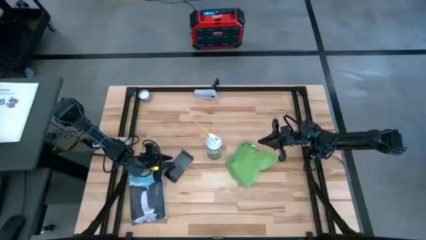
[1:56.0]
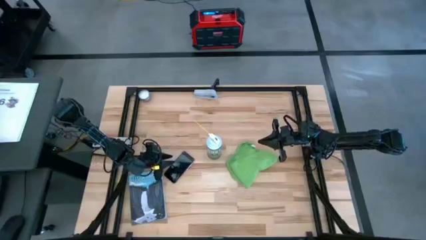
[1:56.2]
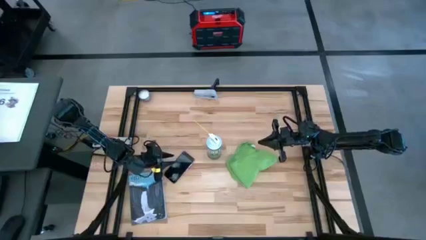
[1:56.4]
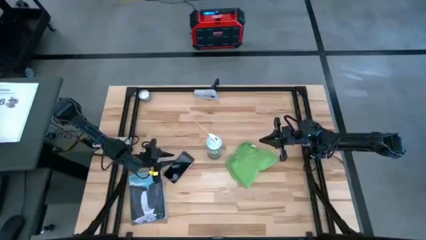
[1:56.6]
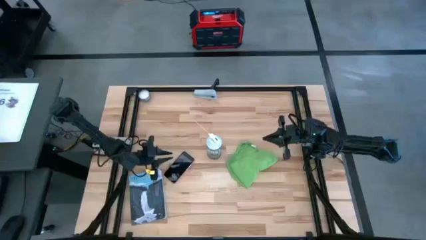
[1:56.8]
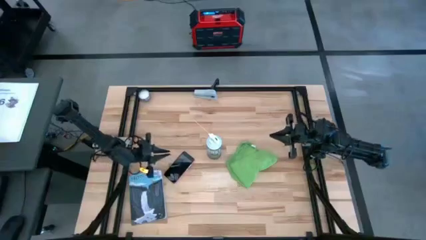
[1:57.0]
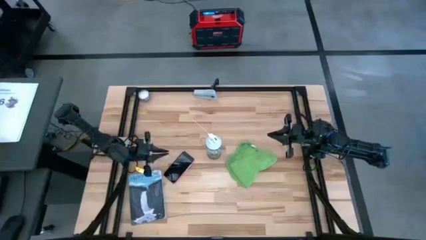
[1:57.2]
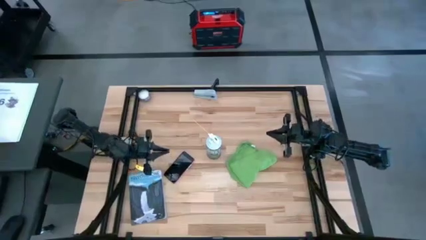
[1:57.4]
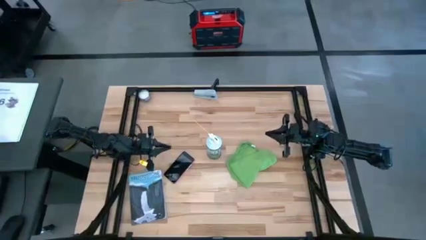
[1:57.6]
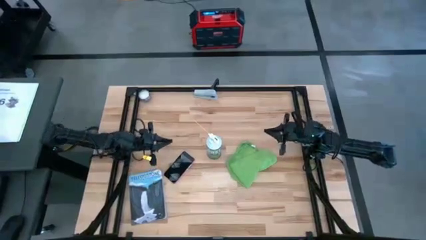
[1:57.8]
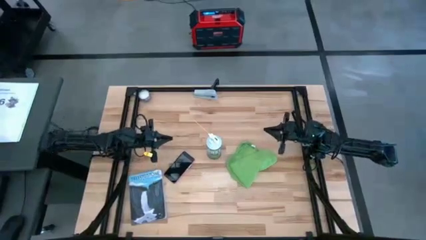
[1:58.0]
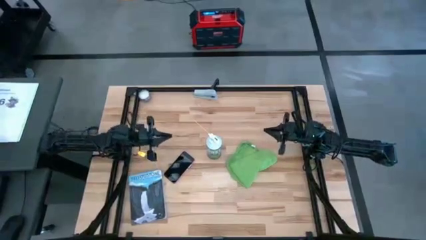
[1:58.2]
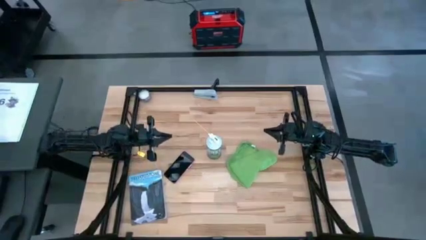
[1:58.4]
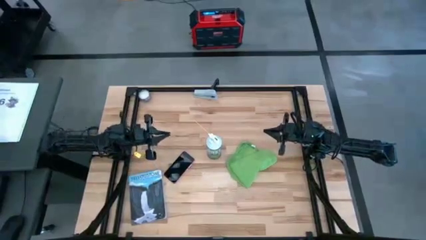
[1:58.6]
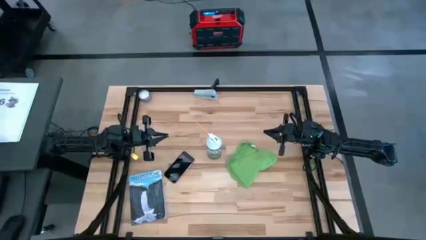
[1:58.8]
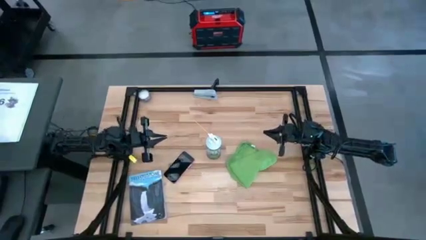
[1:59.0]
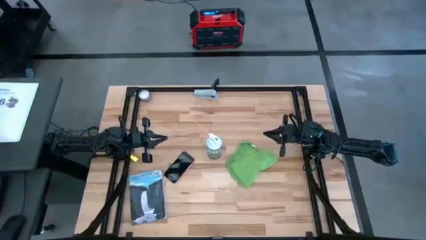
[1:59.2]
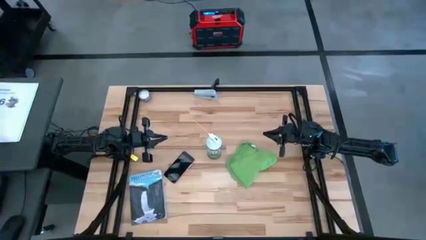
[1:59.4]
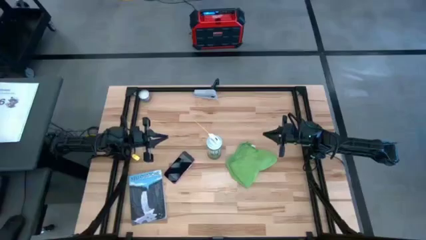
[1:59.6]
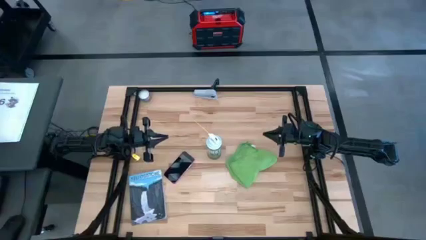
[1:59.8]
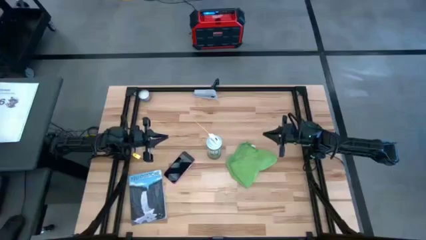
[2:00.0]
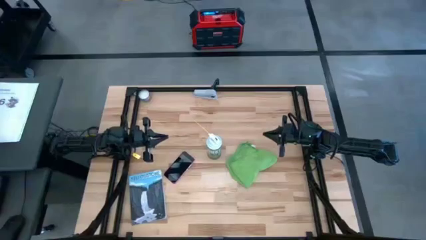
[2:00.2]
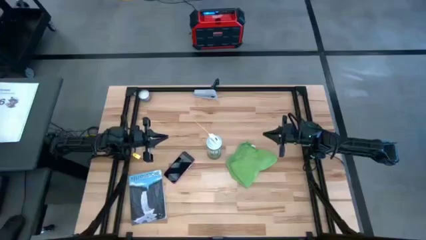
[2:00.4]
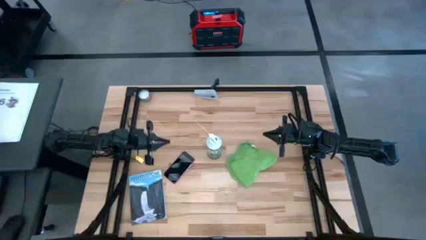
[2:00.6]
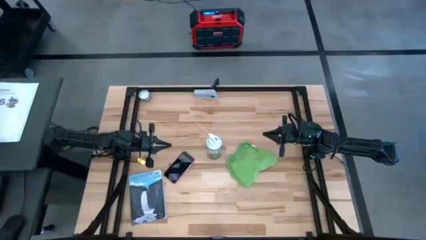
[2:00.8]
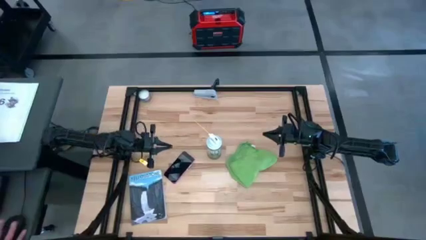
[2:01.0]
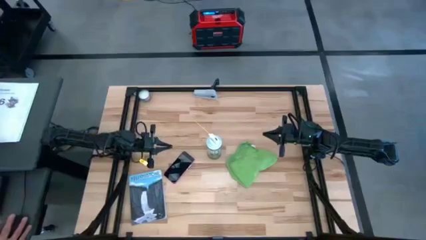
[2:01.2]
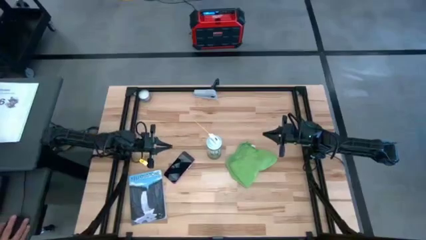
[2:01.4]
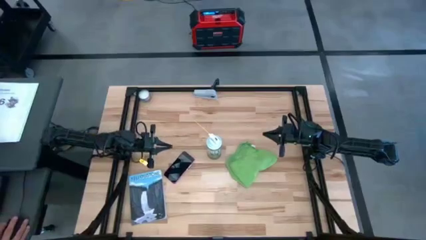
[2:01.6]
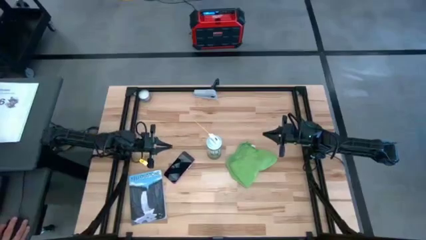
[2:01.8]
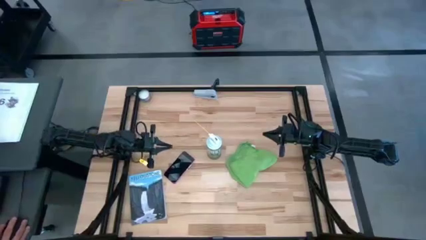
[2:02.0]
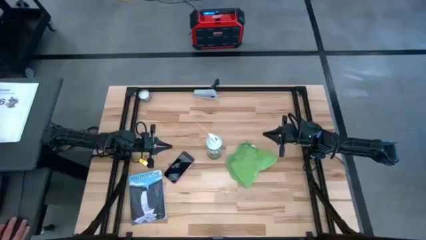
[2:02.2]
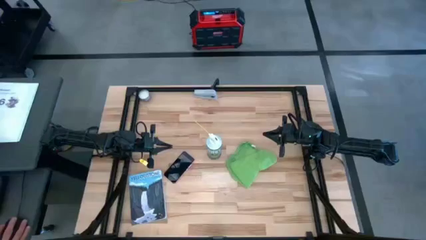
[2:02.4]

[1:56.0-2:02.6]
Task: Apply microfiber cloth
Return to Home Position

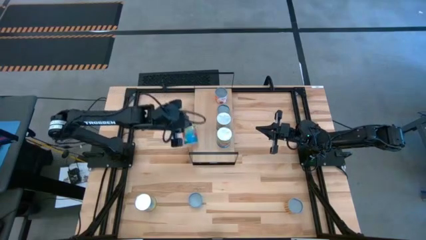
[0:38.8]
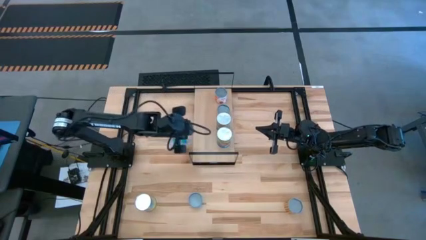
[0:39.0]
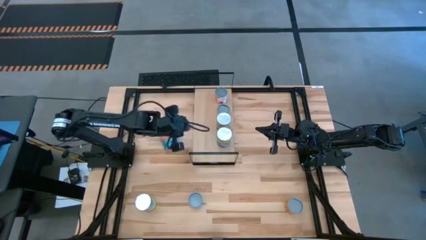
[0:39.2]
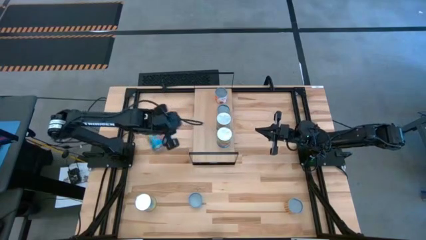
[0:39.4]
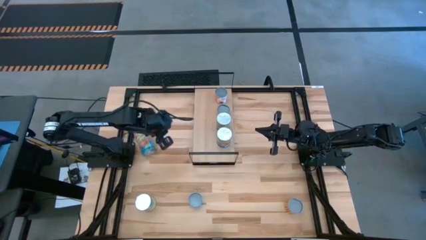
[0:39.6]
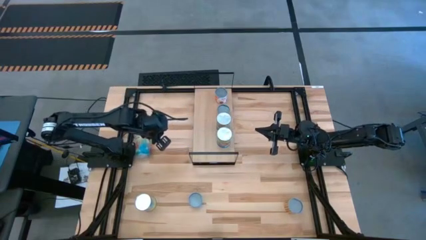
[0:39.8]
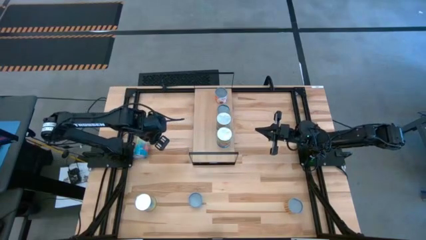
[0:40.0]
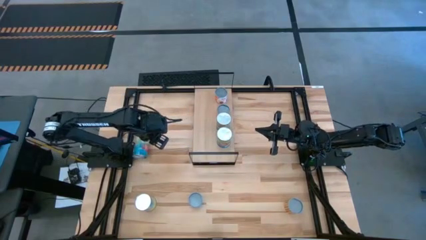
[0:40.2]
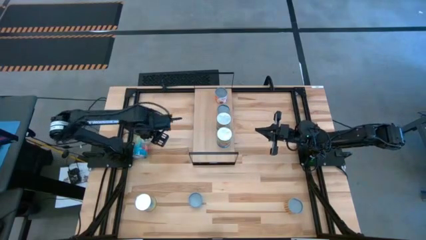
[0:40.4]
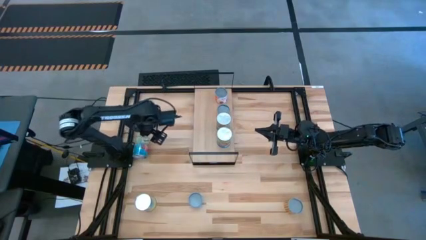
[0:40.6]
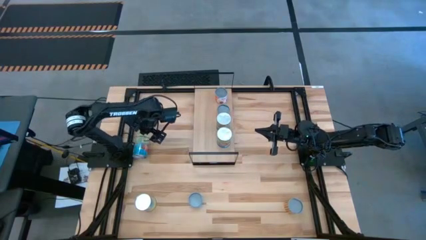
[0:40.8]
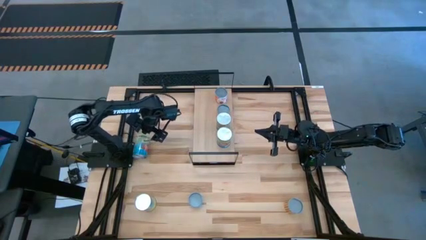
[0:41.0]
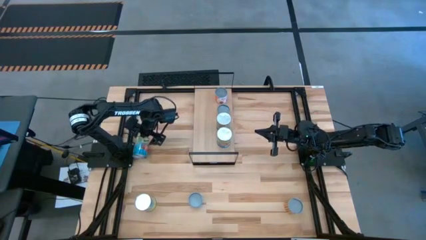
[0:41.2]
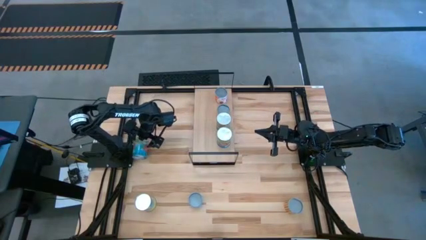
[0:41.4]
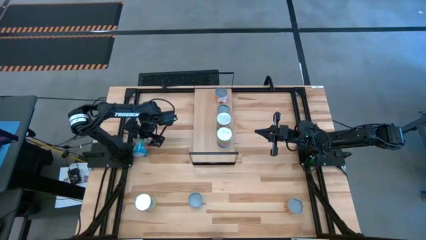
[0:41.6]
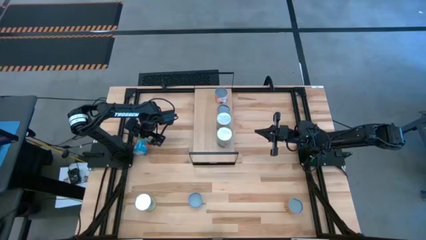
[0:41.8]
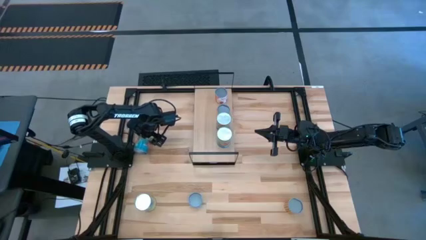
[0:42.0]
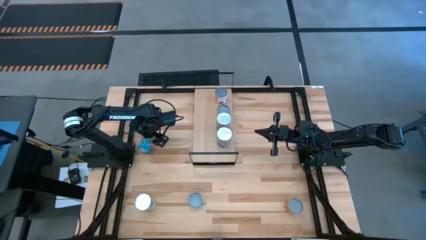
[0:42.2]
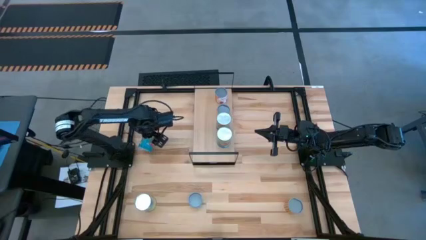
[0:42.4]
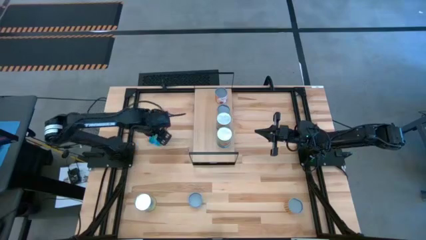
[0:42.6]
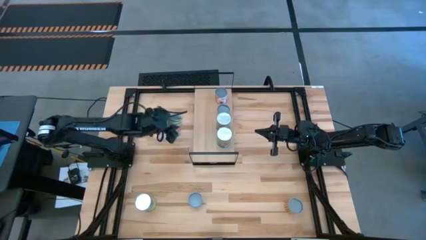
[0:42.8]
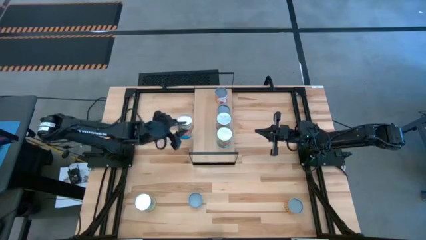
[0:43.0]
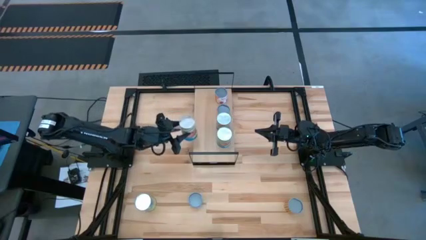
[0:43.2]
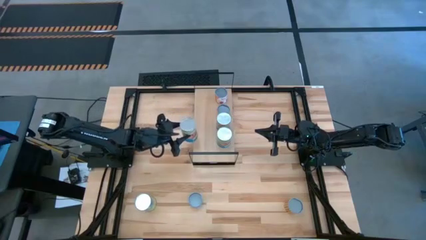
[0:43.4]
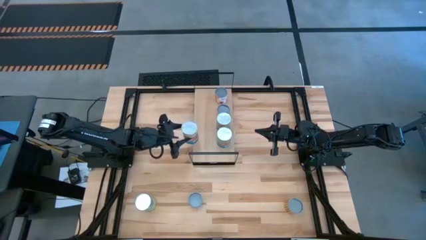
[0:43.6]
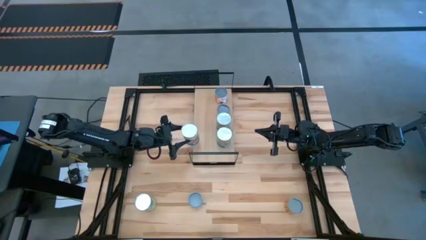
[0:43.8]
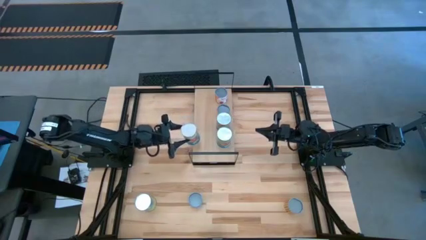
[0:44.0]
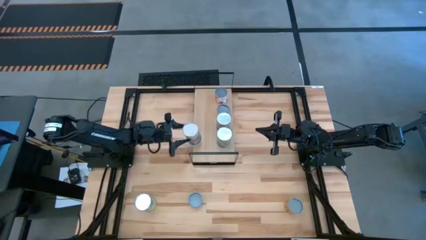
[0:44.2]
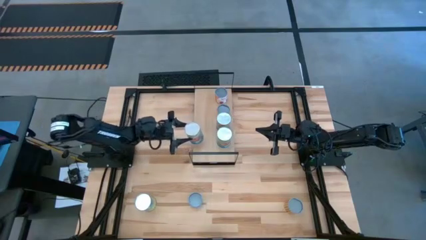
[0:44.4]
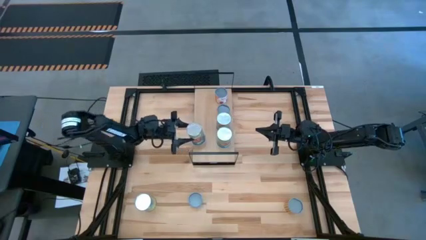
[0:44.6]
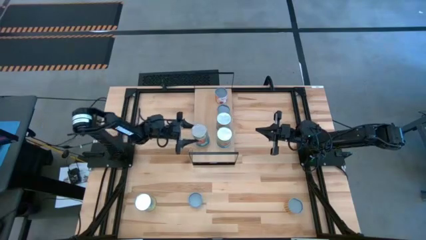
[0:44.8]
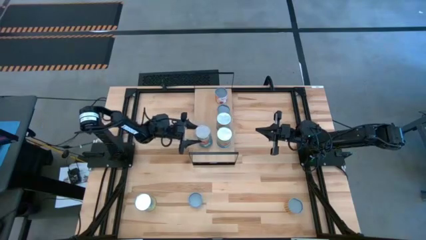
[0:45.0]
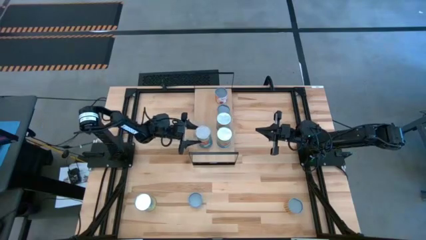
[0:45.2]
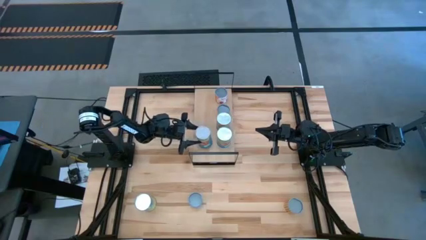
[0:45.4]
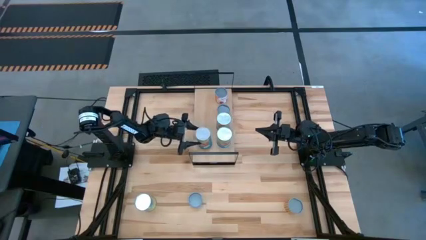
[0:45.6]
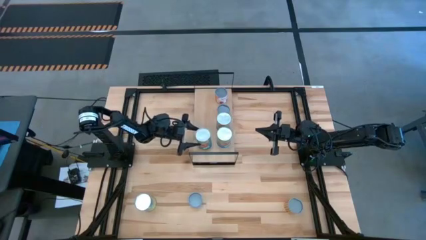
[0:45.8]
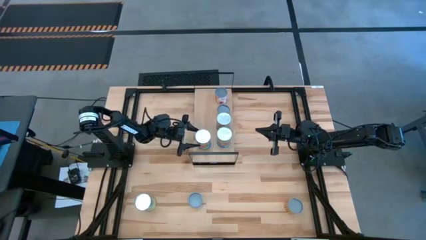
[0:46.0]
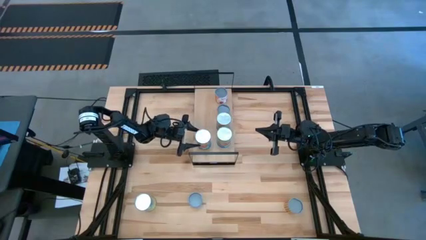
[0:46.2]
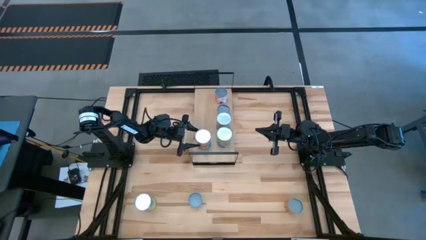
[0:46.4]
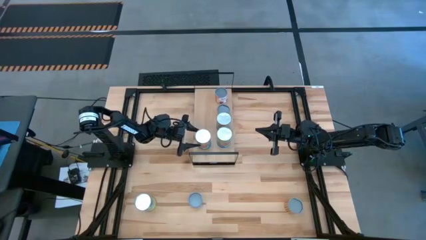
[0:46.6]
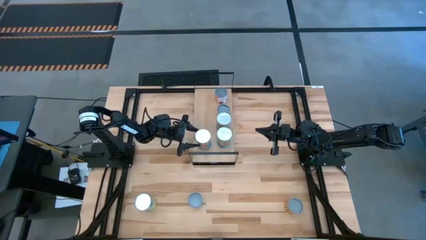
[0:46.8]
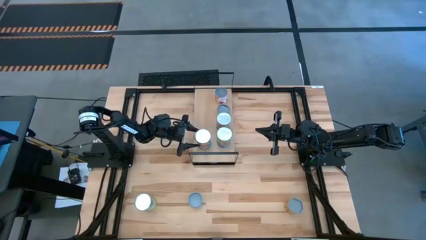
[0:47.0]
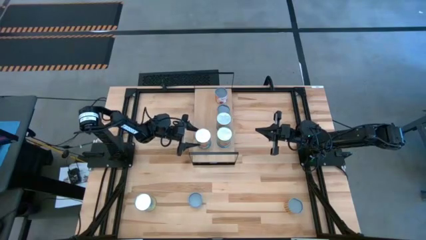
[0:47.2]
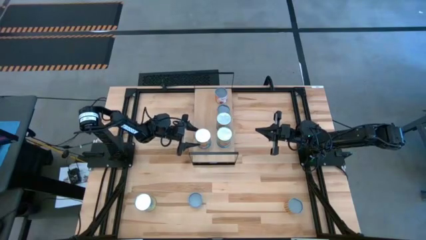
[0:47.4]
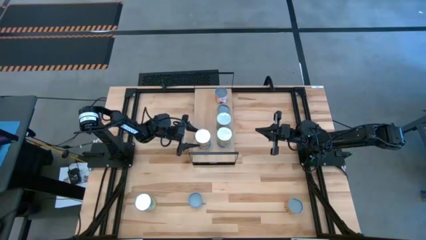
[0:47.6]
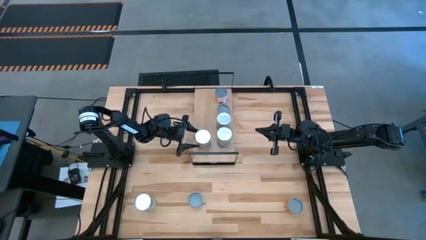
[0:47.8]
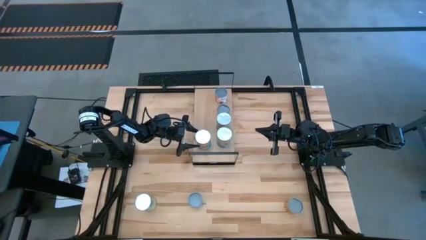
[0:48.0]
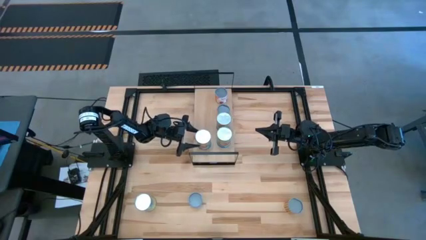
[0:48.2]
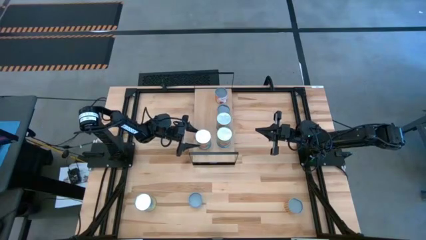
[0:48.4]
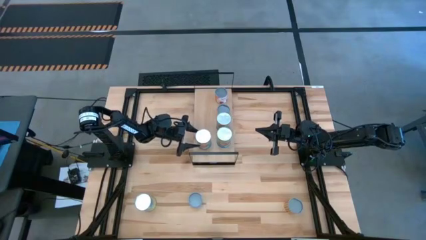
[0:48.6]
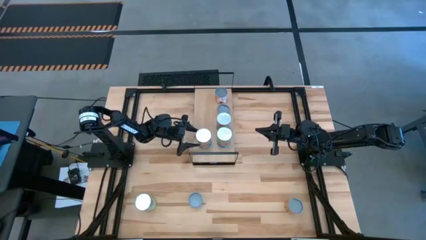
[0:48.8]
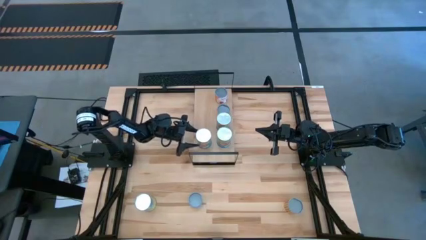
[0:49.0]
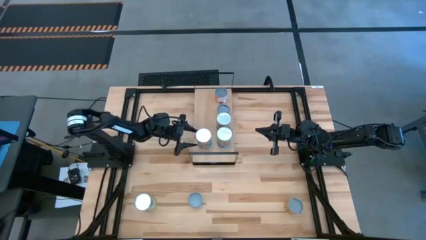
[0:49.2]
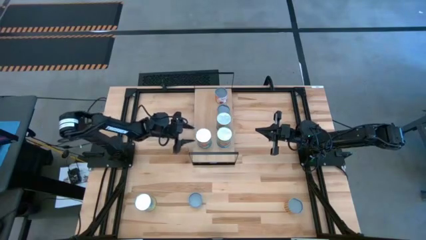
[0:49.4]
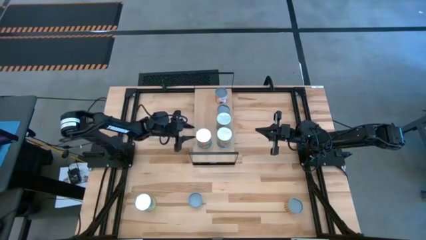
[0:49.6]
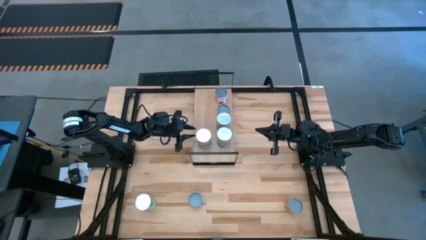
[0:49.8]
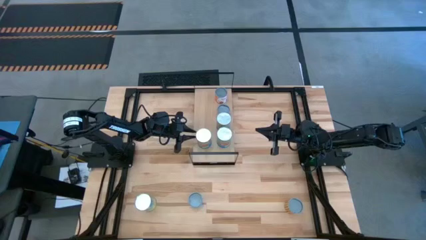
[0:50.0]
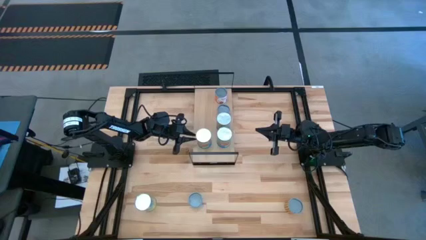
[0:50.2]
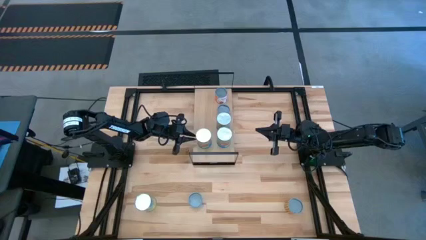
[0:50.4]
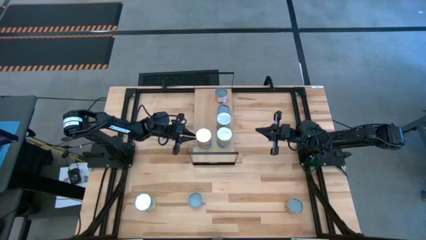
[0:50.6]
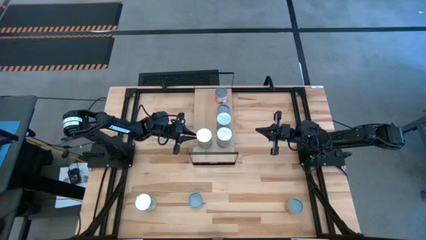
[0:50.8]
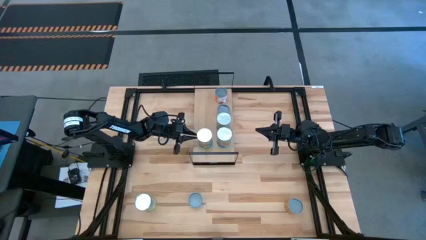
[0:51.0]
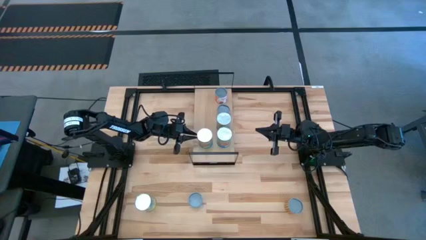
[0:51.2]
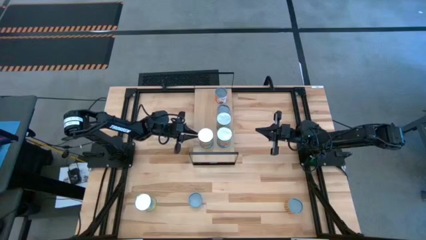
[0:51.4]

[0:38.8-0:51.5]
Task: Pick and place cans onto a shelf
Put the canned tomatoes on the shelf and align them with the other tomato cans
